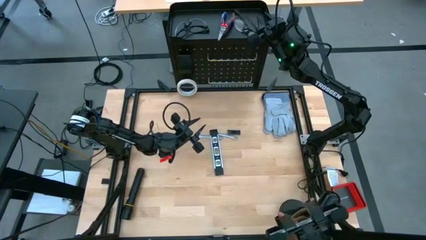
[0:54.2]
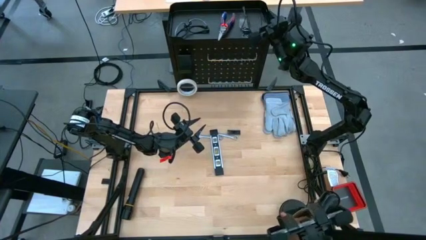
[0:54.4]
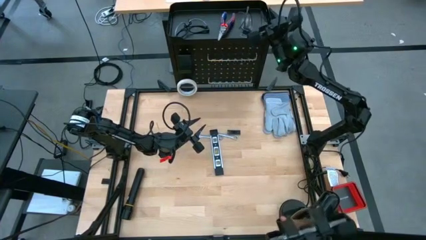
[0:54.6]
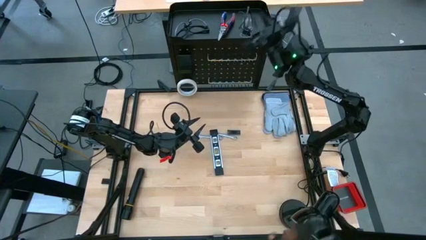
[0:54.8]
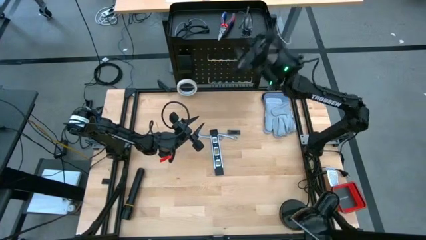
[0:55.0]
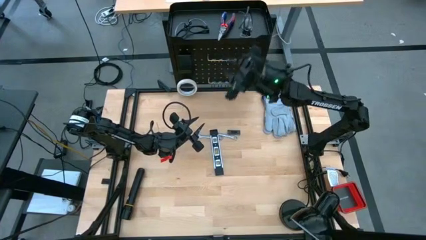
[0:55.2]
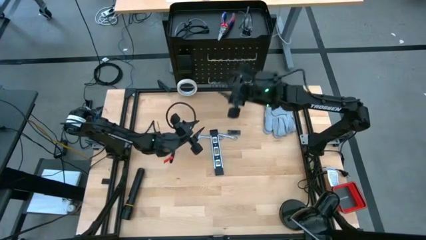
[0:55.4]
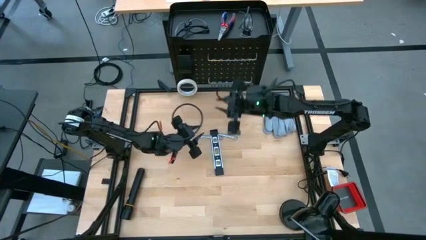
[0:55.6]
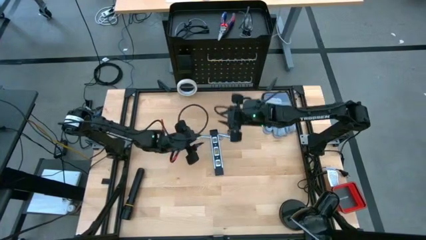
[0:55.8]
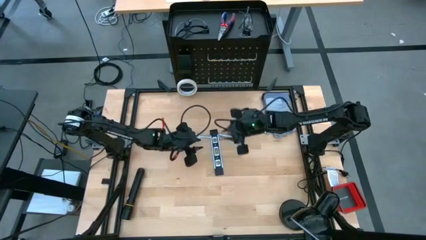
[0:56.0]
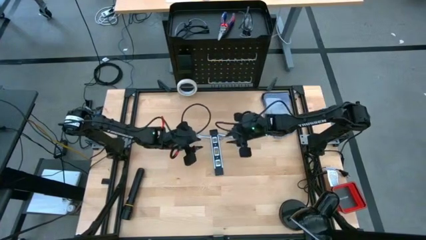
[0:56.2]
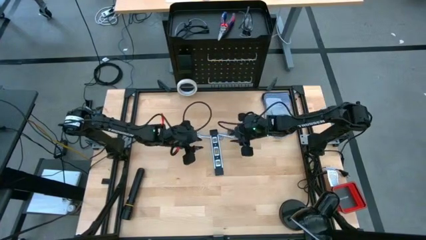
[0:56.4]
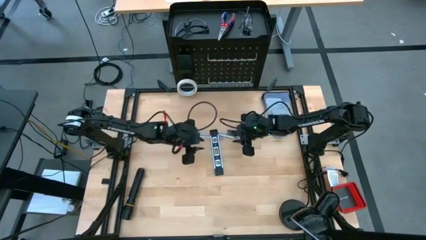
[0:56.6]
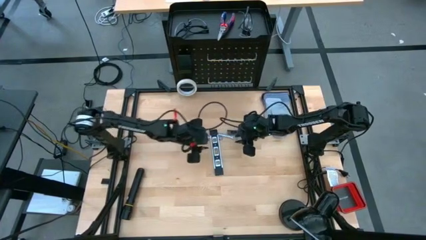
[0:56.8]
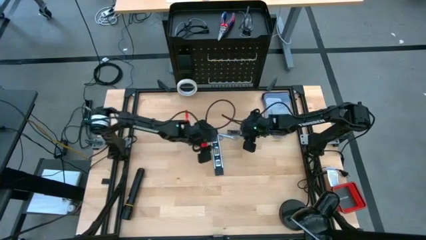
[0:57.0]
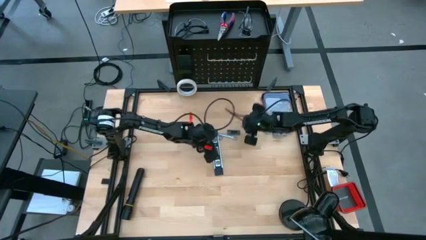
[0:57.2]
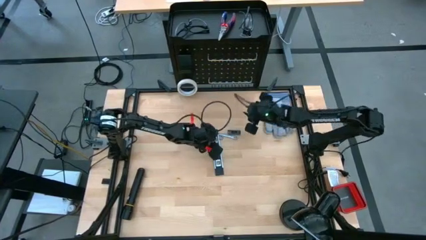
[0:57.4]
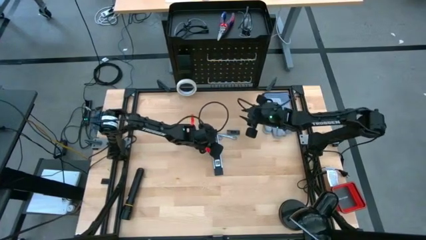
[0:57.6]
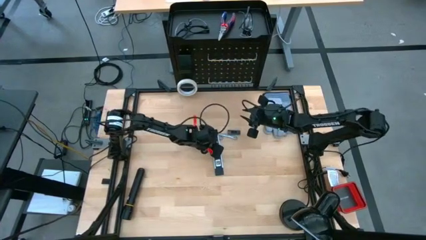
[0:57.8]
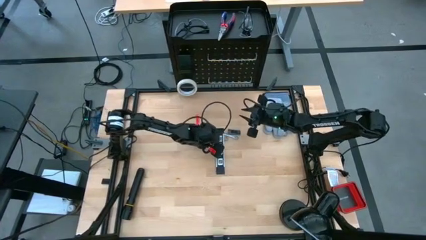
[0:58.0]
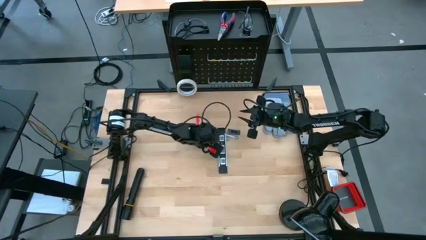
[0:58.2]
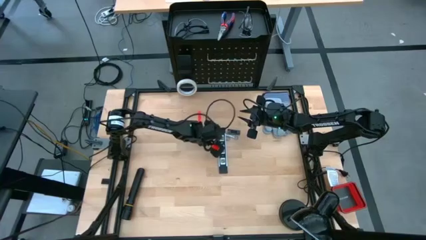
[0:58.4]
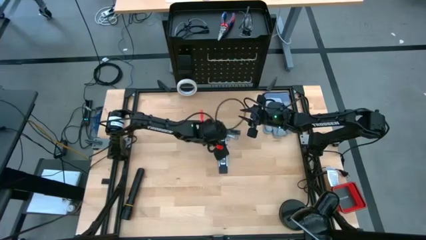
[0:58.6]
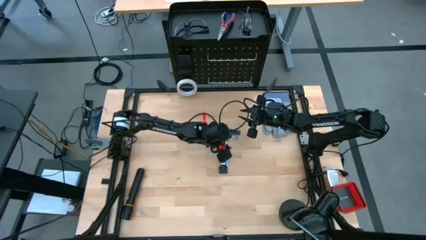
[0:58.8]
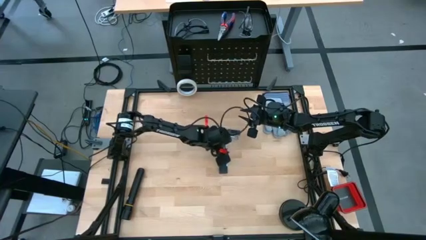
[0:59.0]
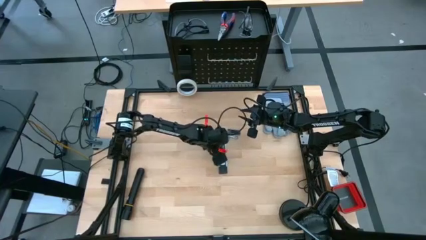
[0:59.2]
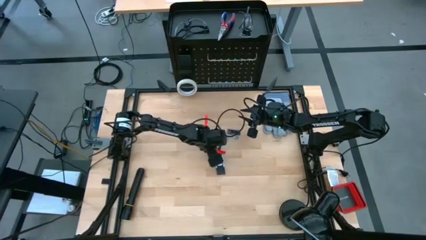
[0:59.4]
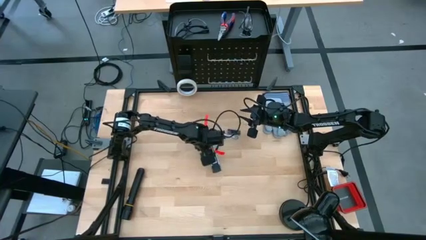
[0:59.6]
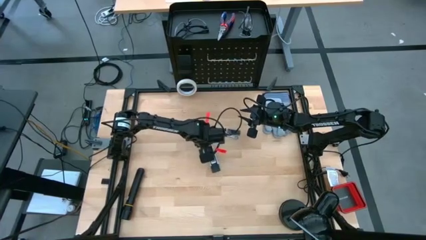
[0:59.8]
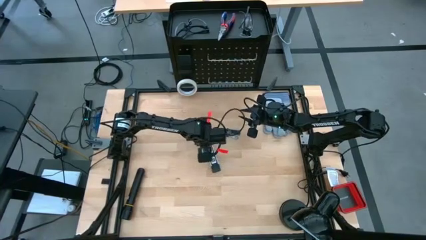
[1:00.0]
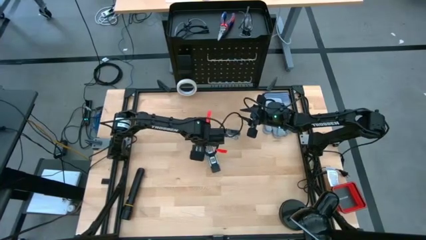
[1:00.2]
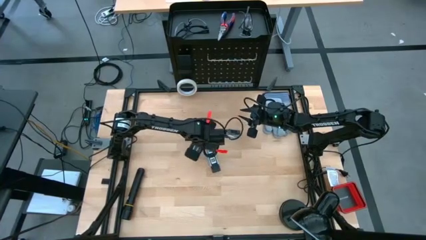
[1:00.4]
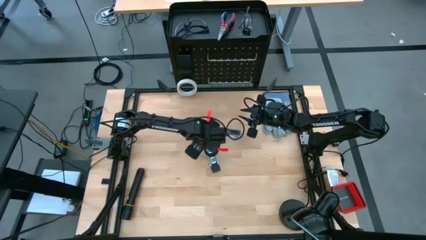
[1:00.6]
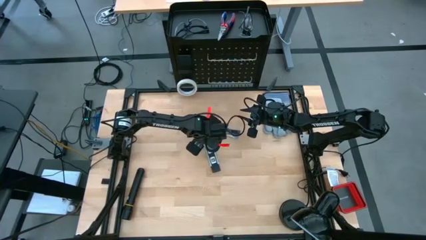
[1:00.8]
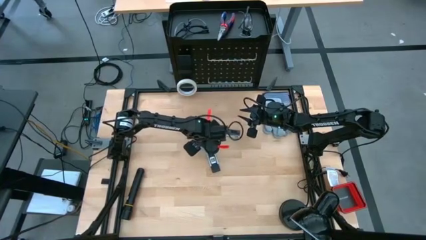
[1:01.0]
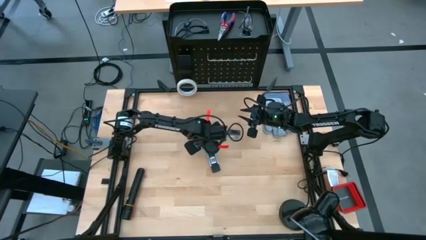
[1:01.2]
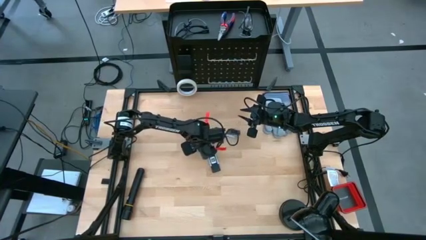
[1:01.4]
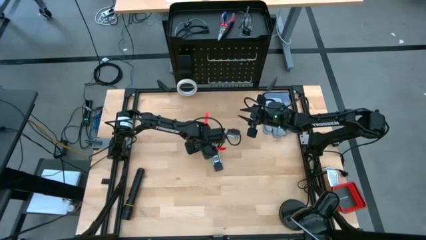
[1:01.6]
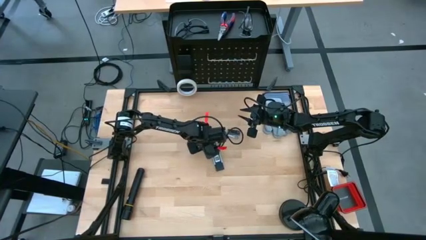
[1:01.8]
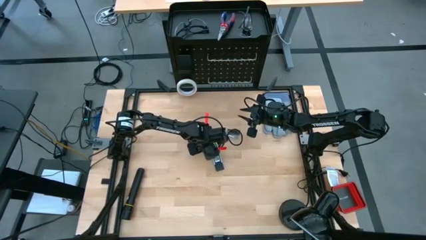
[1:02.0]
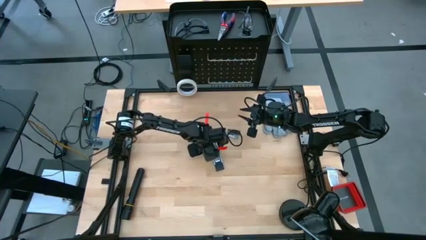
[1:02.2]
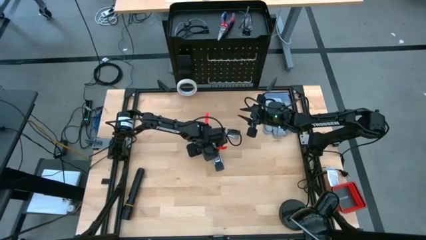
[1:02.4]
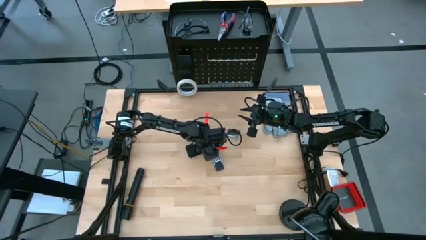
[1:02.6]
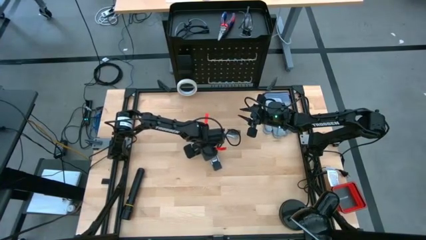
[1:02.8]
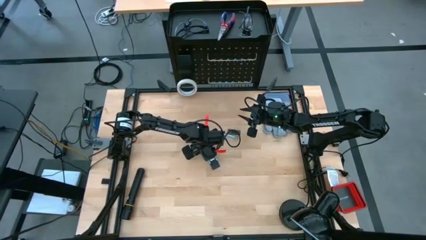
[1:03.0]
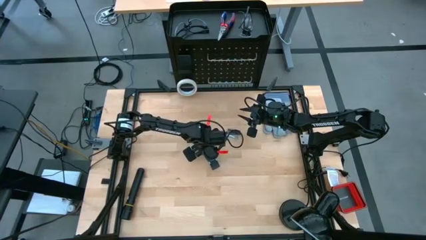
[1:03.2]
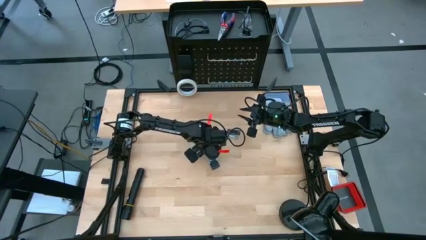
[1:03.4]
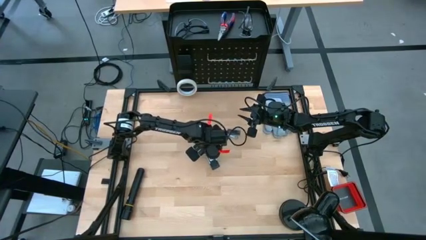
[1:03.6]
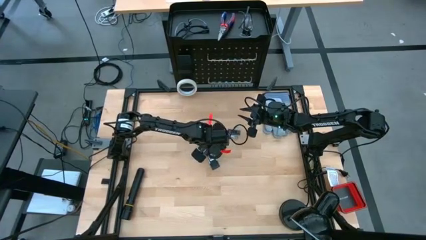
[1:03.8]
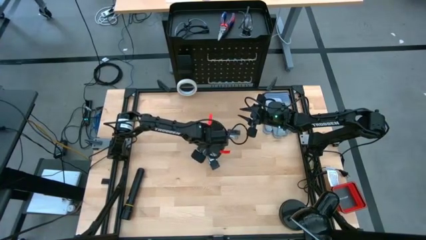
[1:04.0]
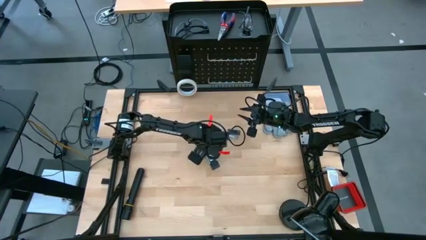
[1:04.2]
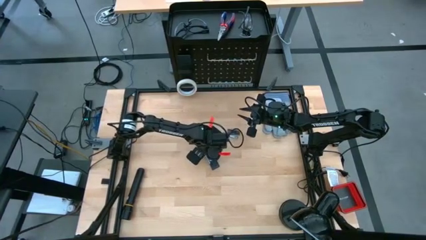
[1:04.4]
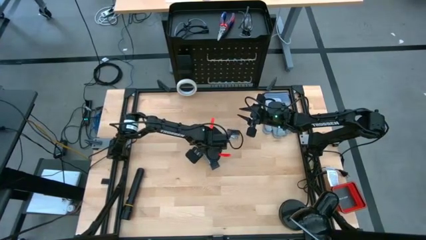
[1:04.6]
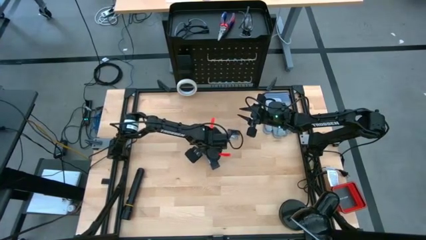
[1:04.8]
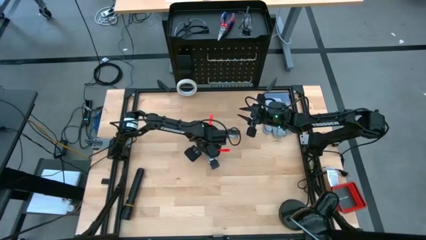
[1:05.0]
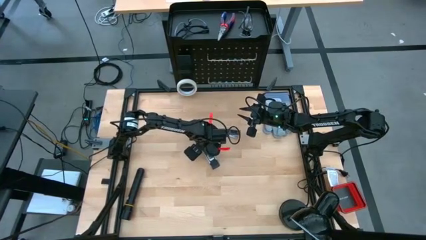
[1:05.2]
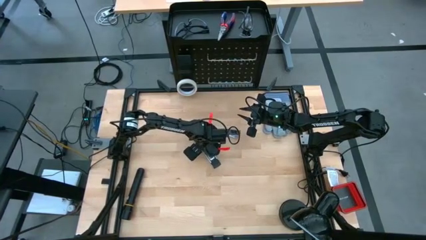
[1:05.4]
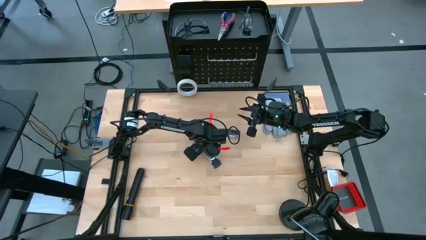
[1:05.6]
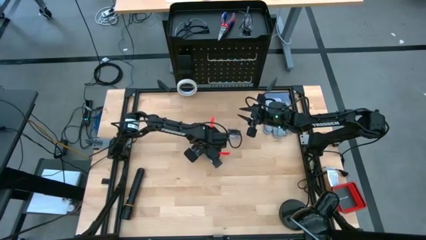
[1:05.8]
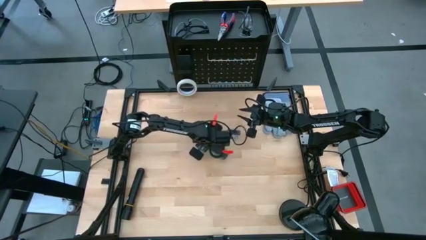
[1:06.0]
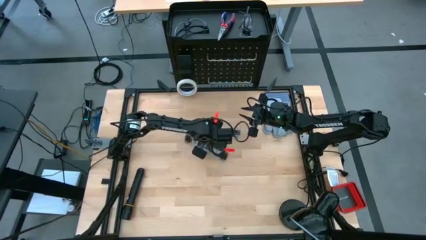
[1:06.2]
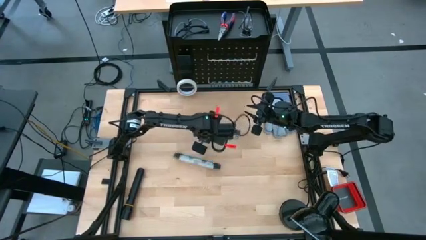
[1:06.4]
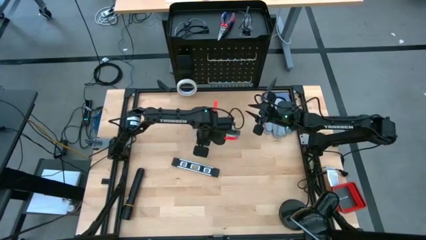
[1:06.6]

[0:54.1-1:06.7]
Task: Hang tools onto peg board
Put the black spirit level on the black pegboard
